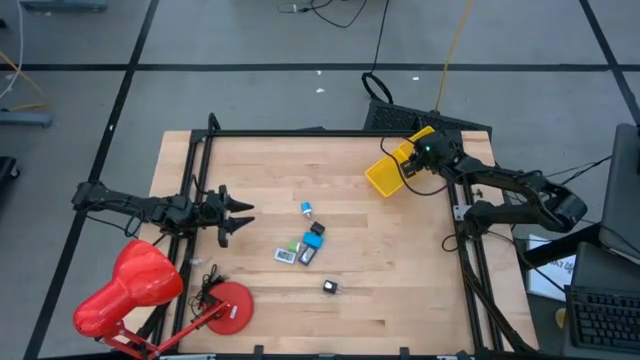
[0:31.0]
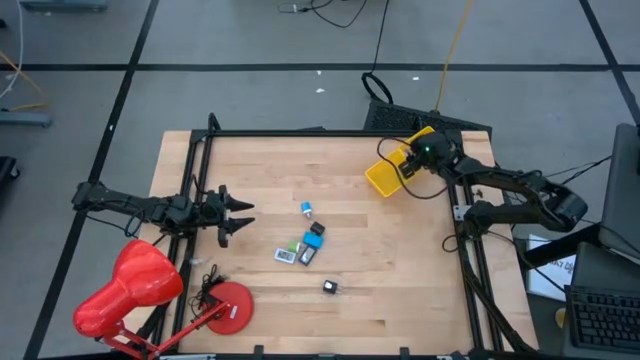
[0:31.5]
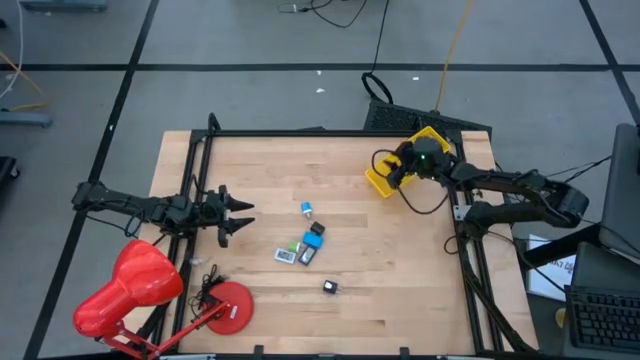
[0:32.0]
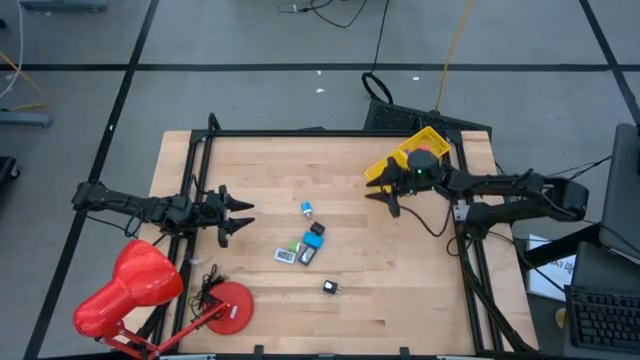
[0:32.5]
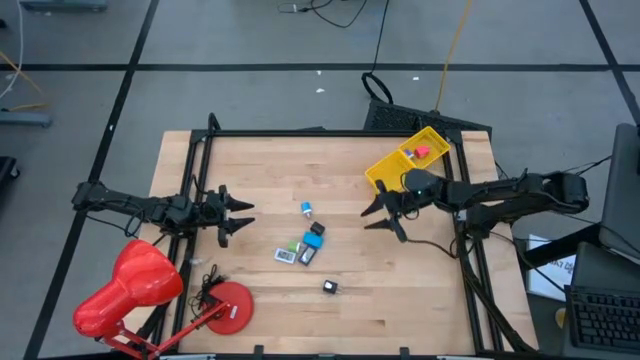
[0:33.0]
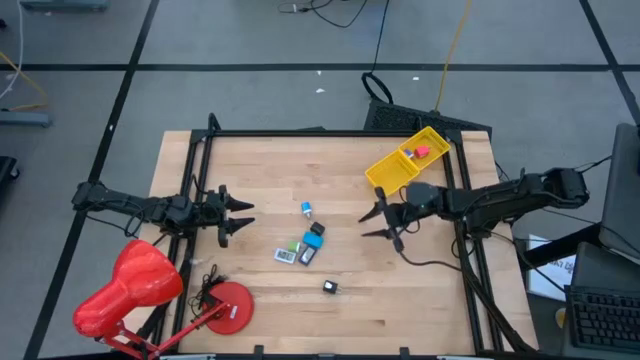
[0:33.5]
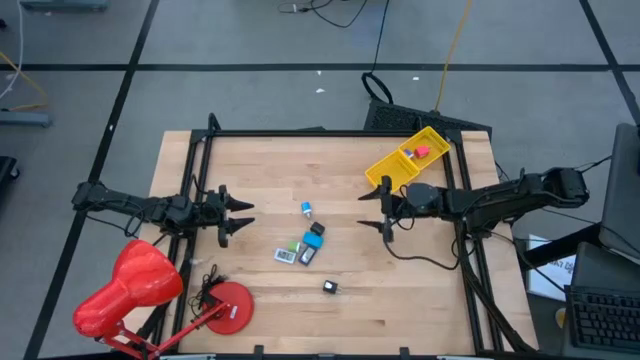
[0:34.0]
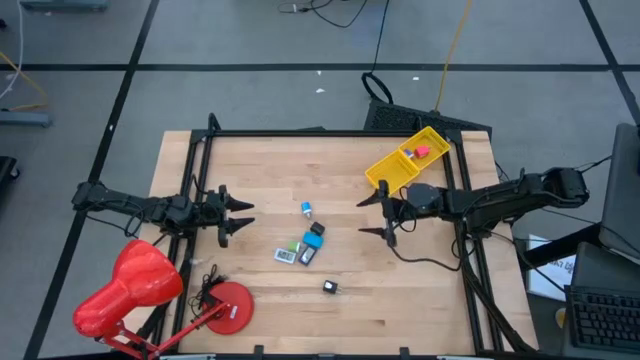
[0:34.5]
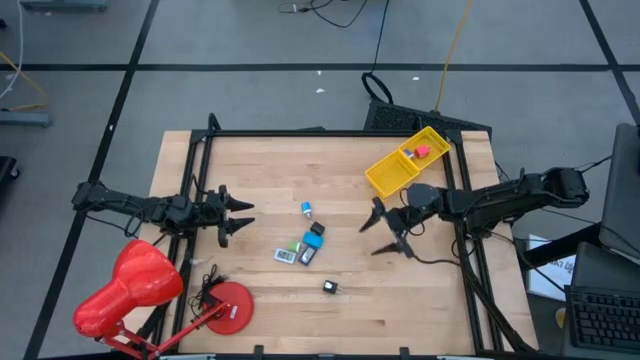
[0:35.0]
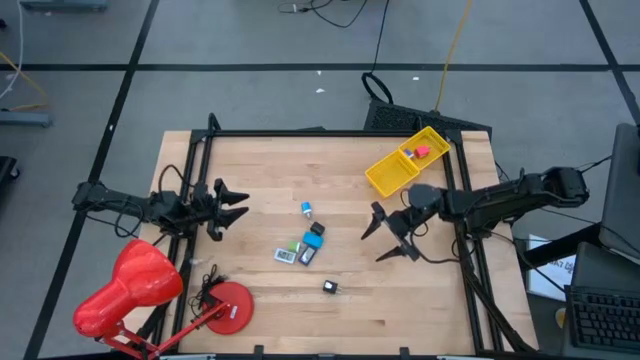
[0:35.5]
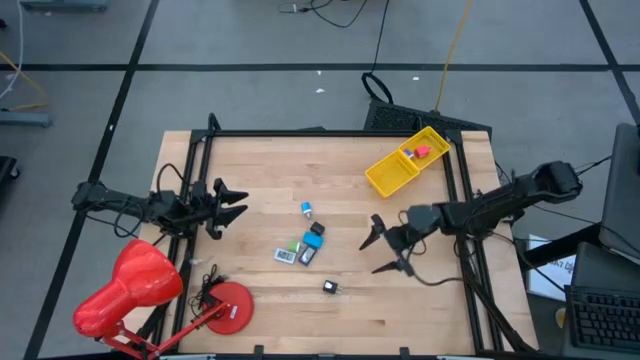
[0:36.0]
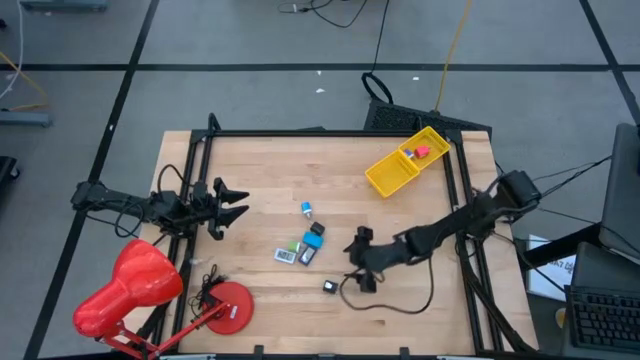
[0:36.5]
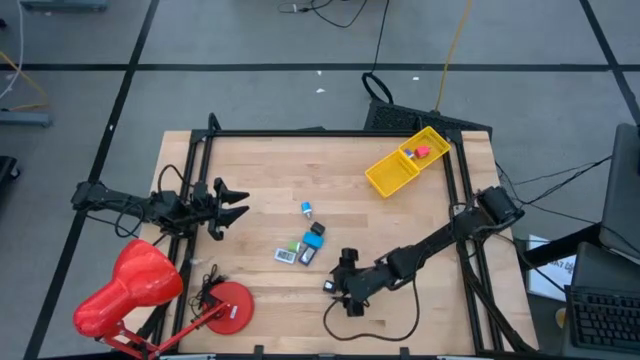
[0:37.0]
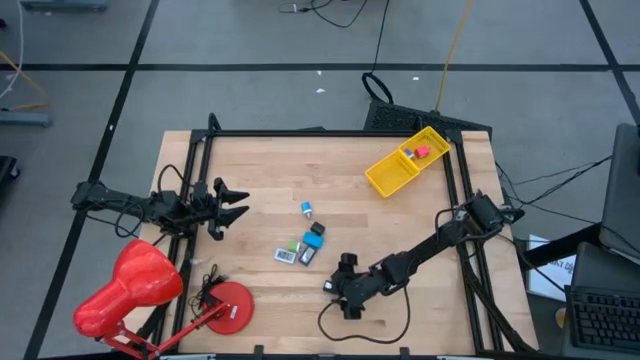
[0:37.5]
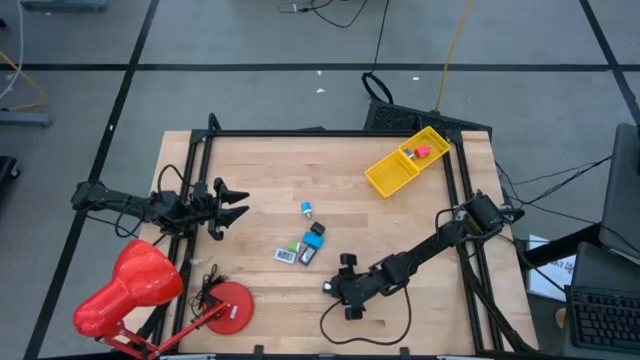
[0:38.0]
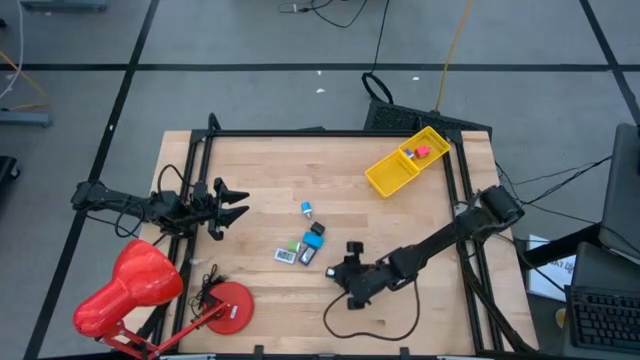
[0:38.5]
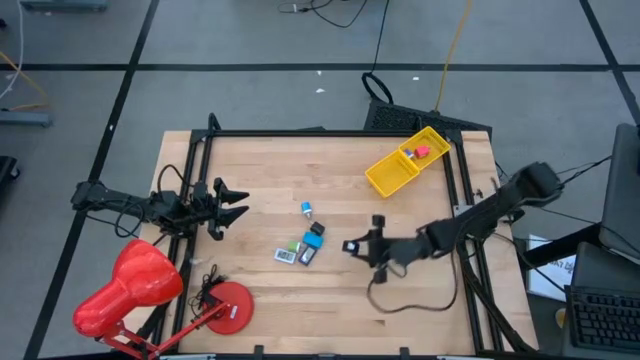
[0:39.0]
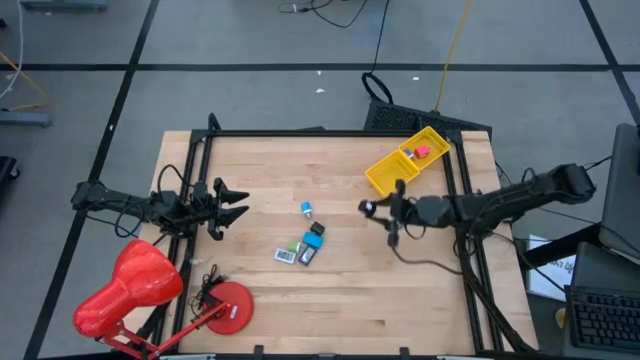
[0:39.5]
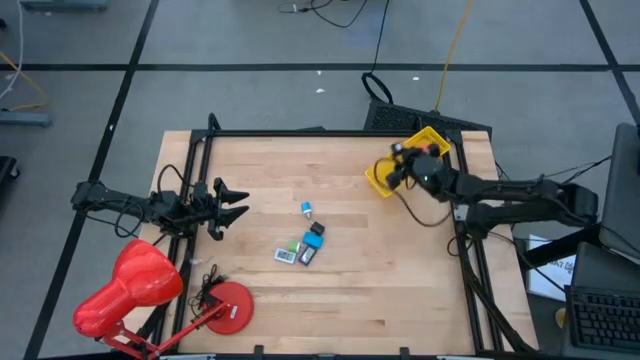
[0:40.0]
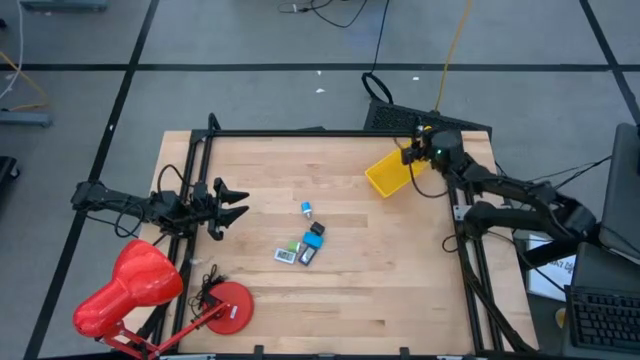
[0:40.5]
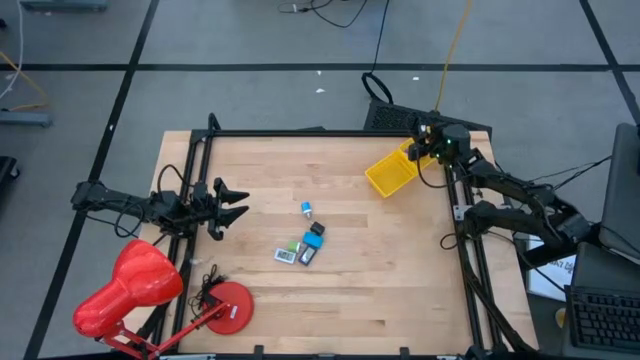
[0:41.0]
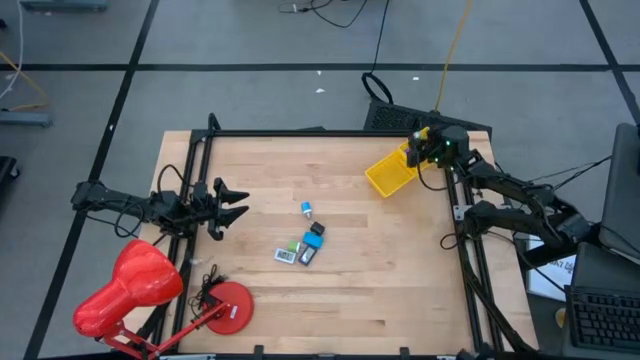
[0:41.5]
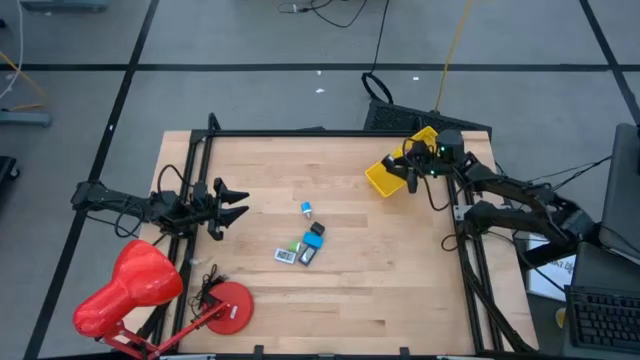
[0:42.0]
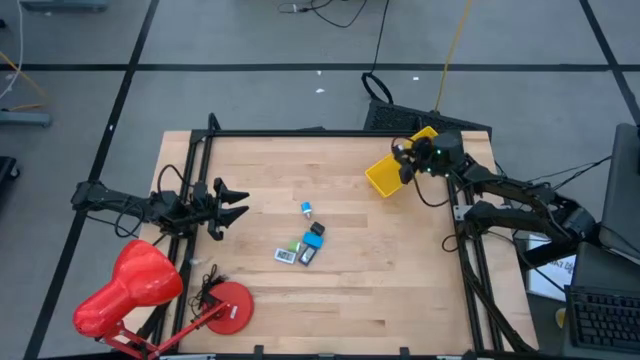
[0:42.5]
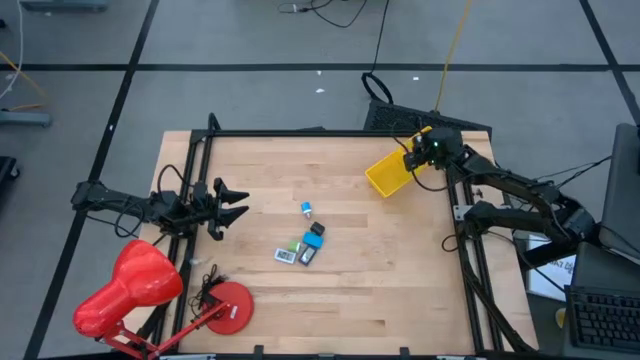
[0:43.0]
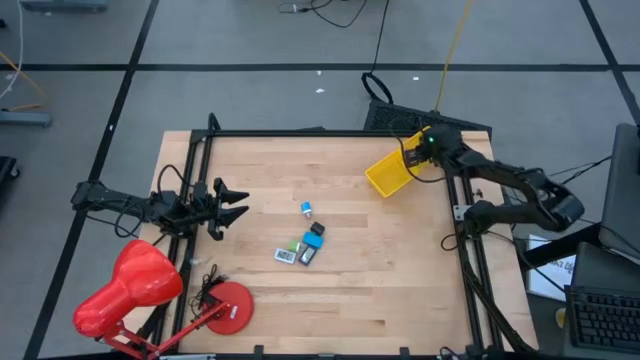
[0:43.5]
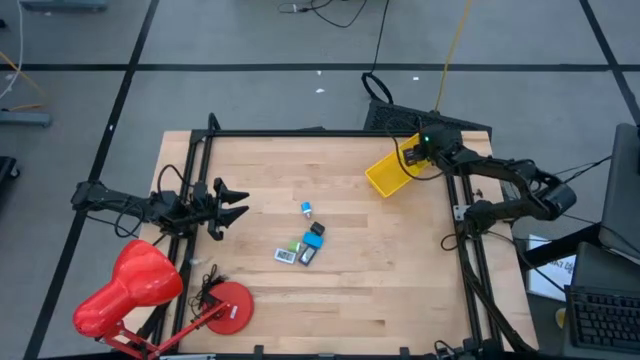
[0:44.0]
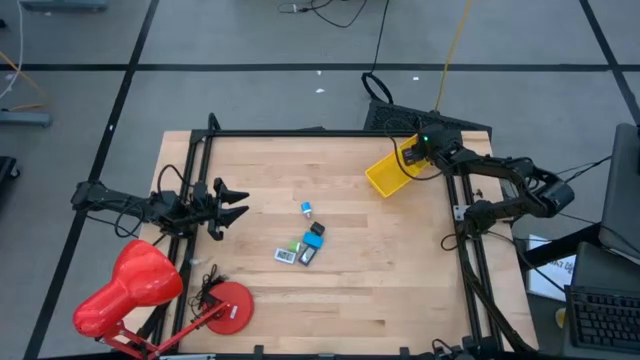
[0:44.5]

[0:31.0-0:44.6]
Task: Pick & Place Office items
Put the bottom black charger adapter into the top yellow basket

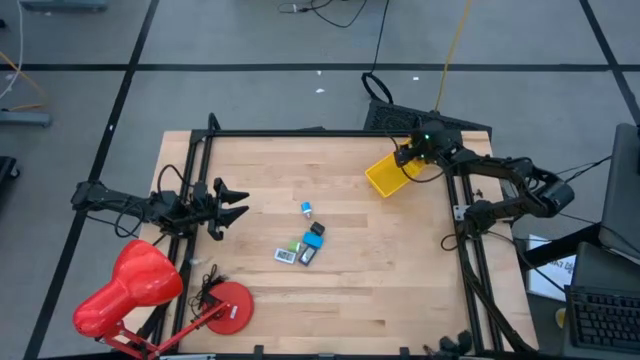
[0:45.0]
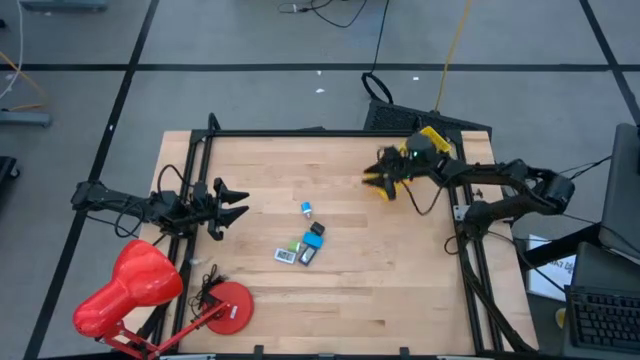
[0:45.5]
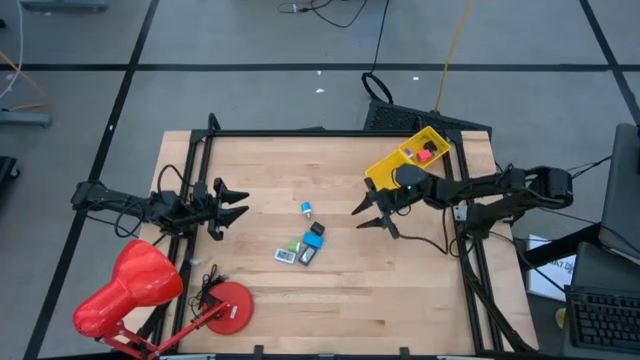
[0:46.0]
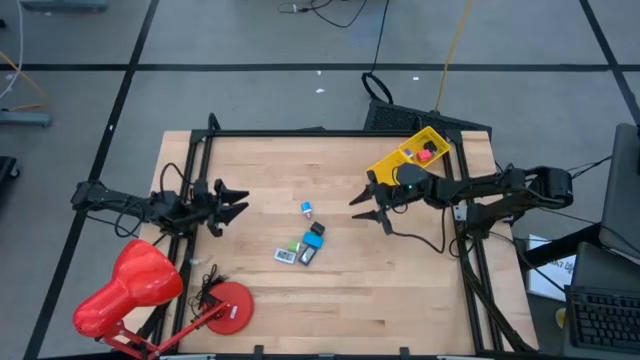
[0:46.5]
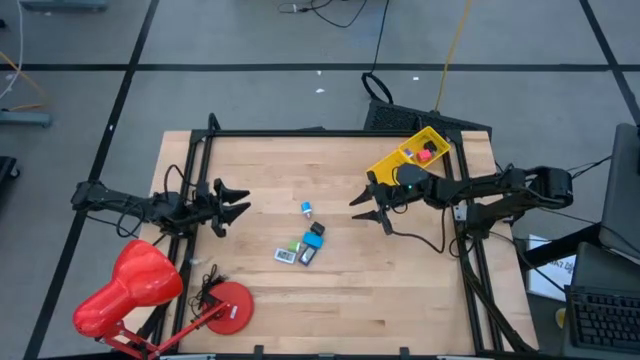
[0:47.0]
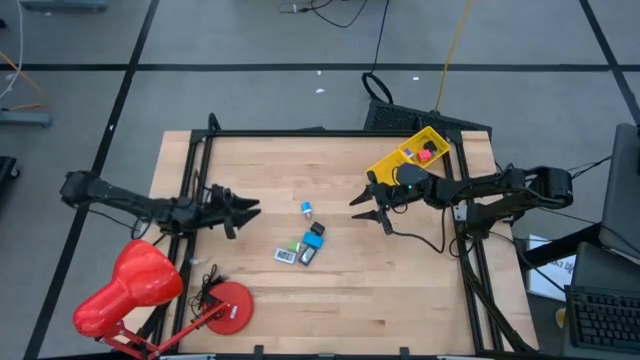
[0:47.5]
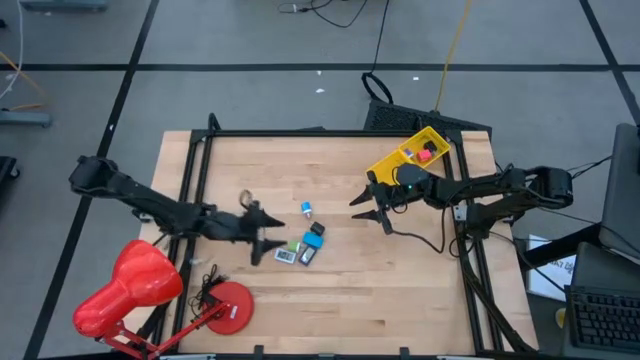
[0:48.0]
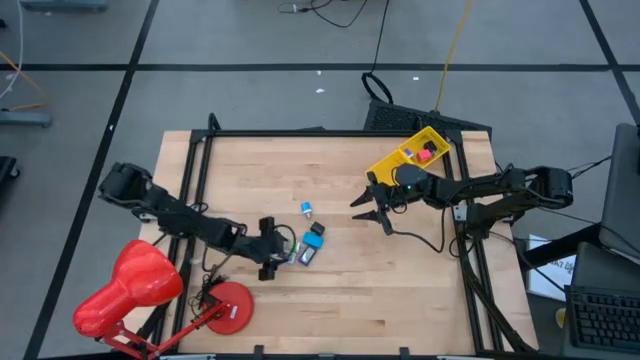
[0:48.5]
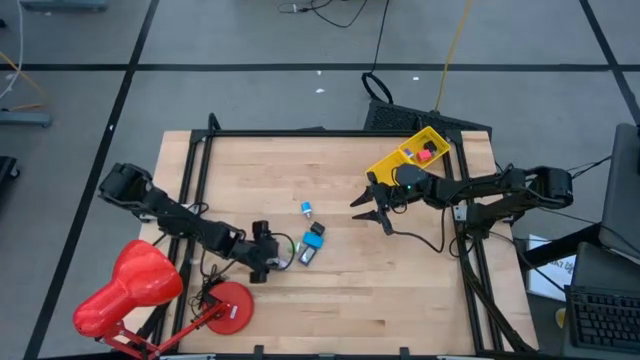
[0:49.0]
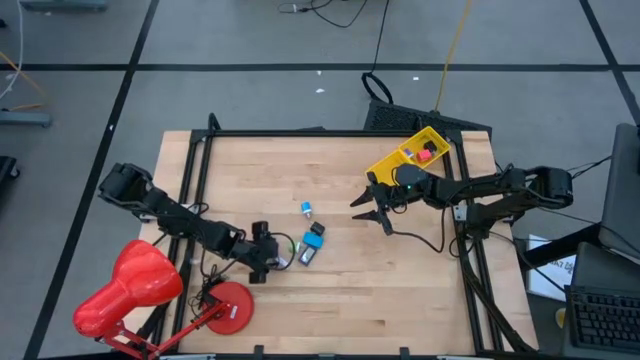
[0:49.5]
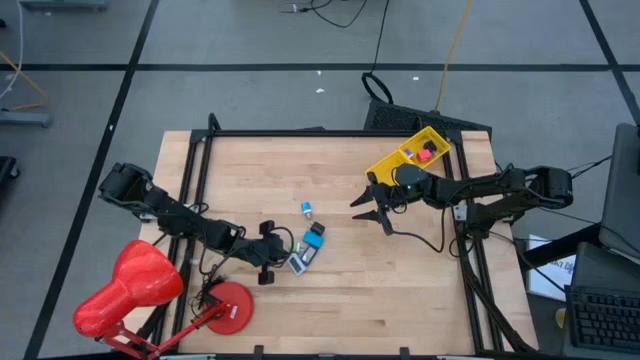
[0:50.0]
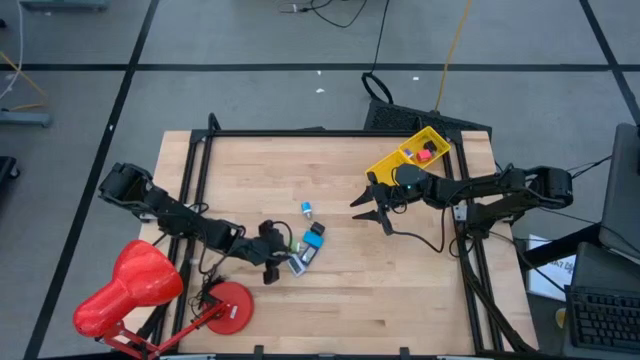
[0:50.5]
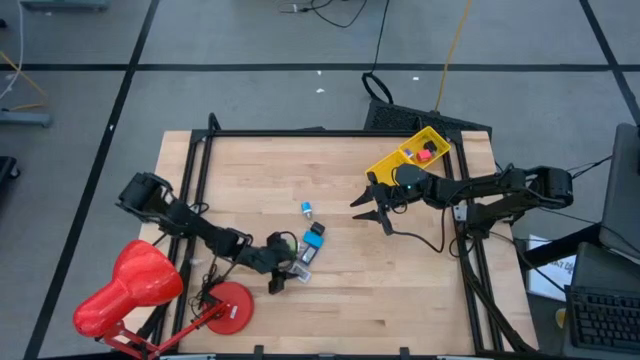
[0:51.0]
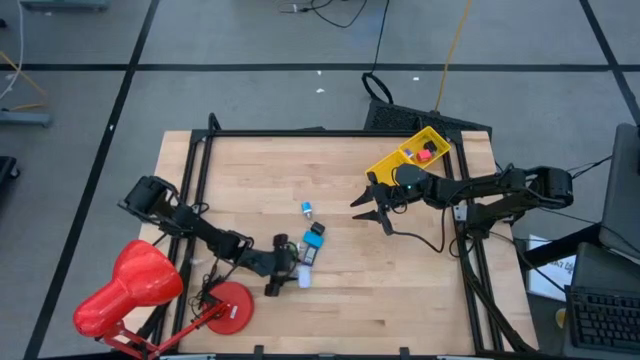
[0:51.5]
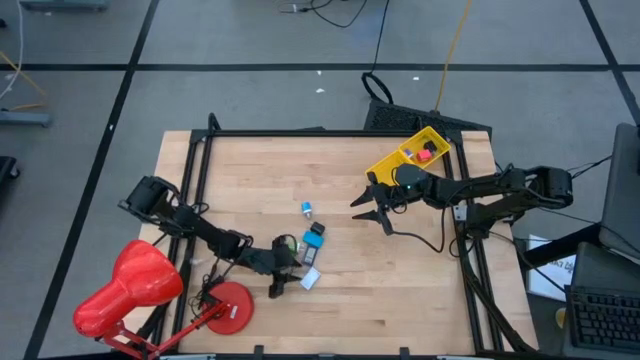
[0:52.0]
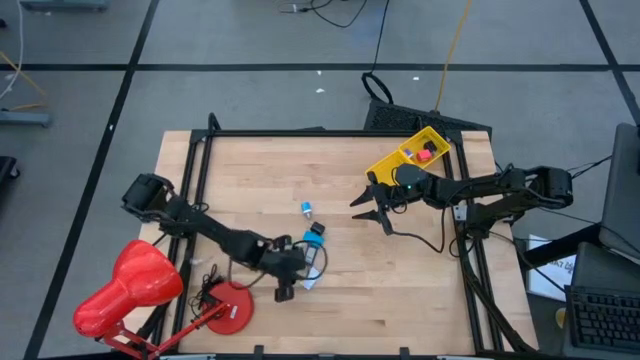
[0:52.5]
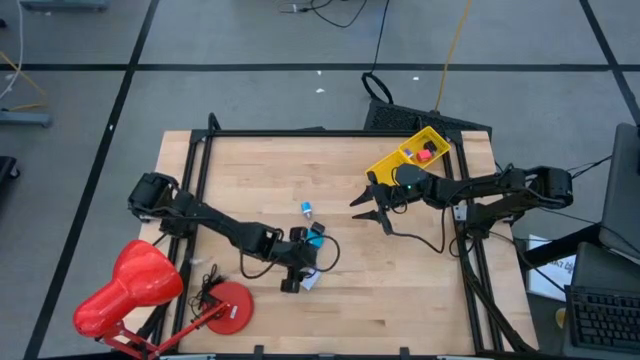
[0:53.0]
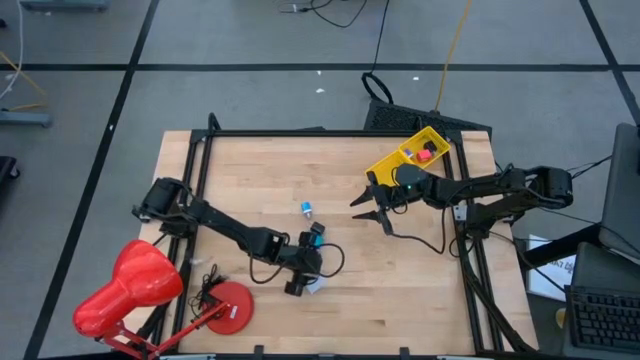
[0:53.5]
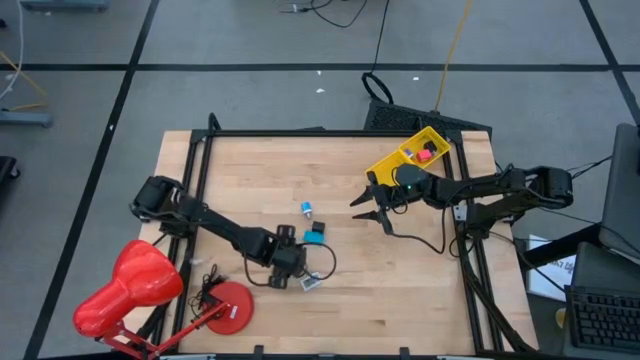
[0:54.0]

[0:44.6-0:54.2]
Put the white digital clock into the bottom yellow basket
